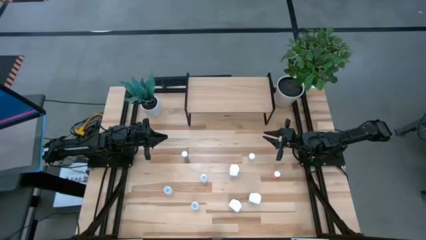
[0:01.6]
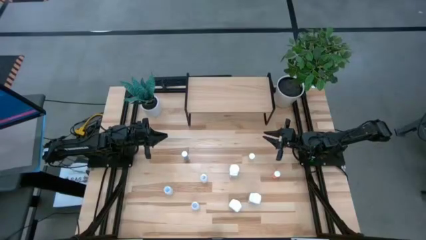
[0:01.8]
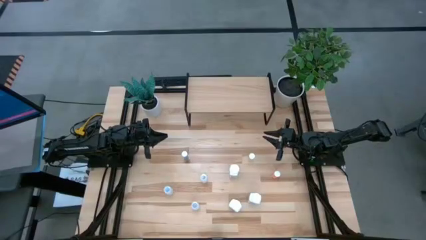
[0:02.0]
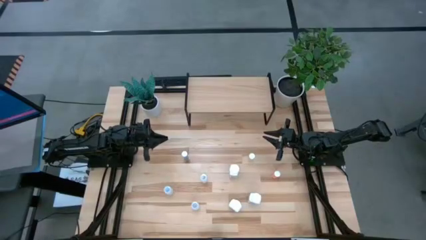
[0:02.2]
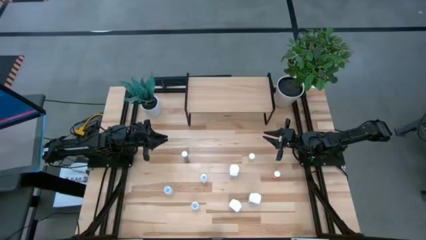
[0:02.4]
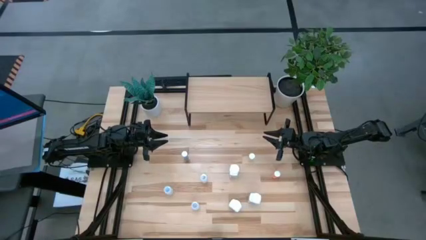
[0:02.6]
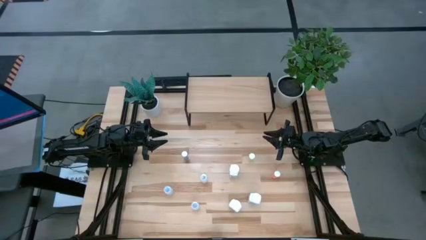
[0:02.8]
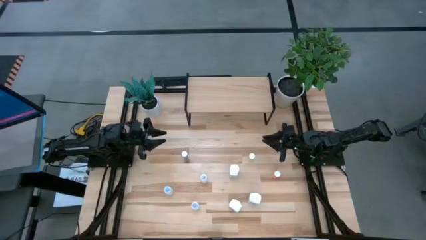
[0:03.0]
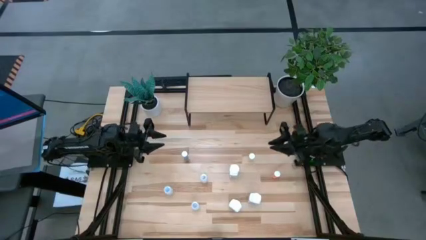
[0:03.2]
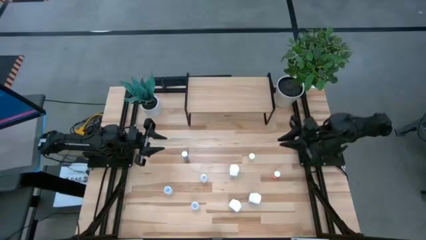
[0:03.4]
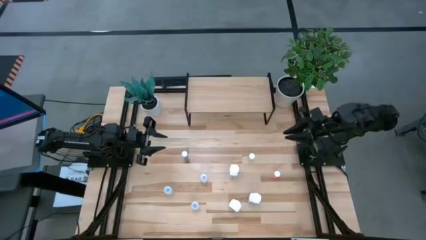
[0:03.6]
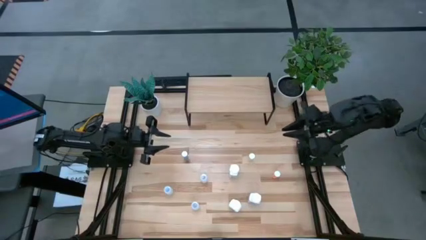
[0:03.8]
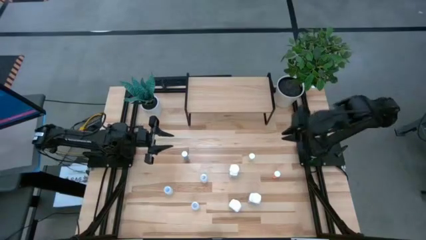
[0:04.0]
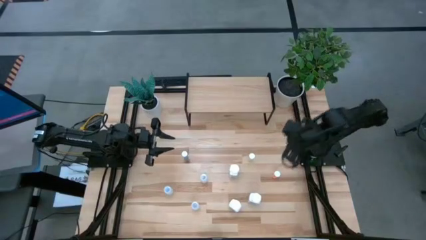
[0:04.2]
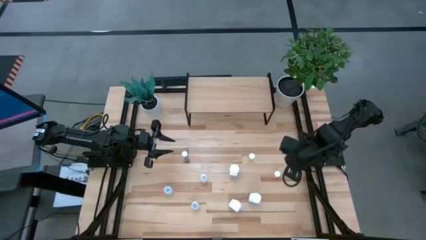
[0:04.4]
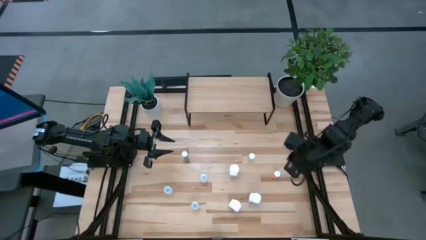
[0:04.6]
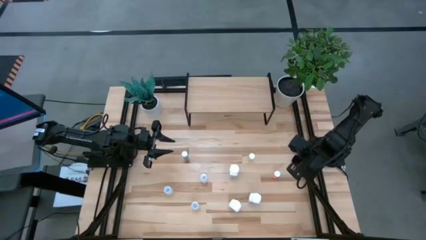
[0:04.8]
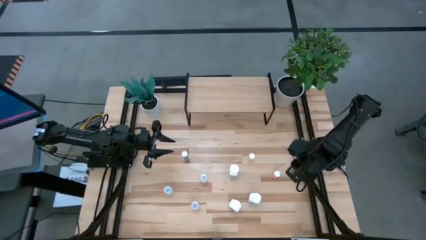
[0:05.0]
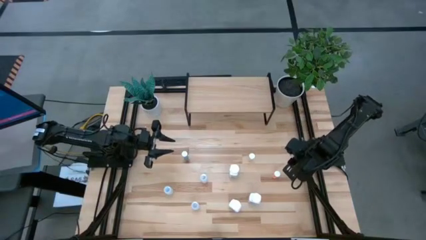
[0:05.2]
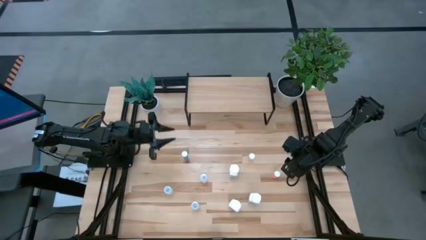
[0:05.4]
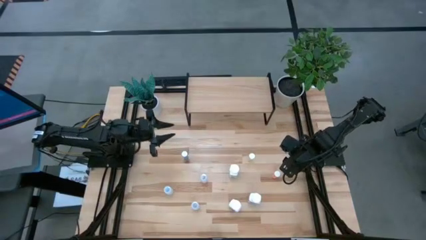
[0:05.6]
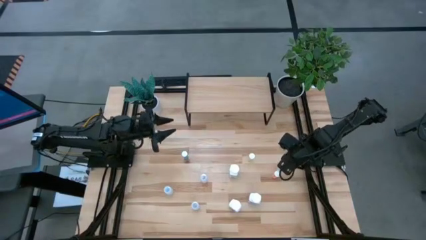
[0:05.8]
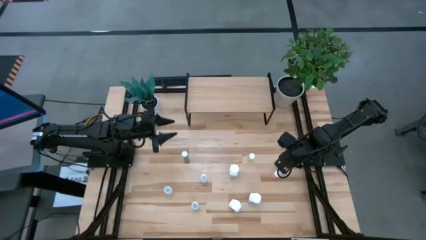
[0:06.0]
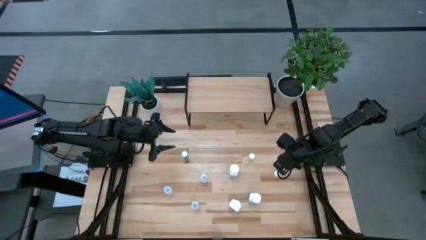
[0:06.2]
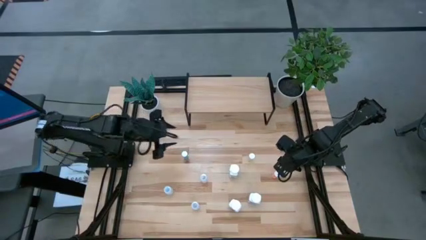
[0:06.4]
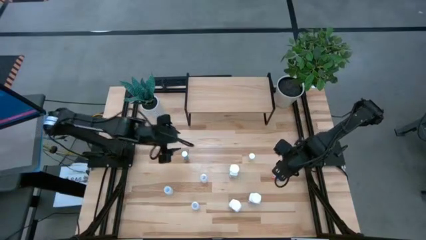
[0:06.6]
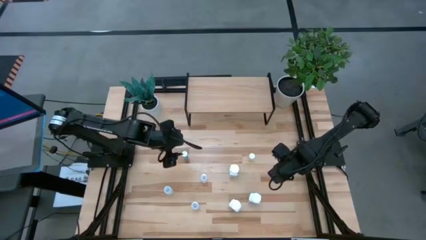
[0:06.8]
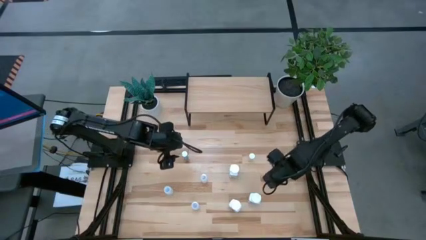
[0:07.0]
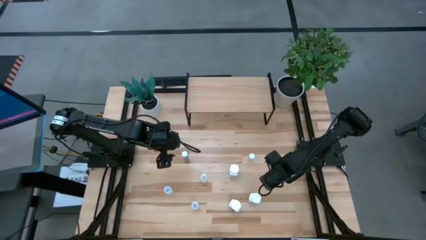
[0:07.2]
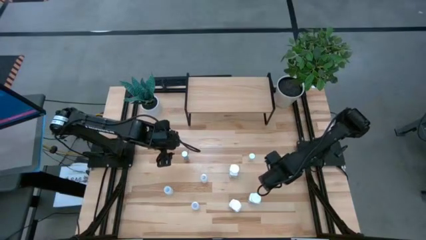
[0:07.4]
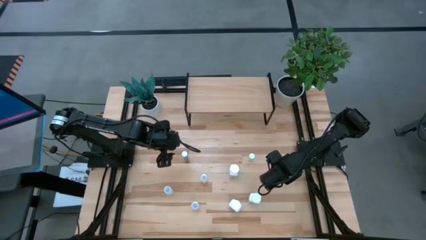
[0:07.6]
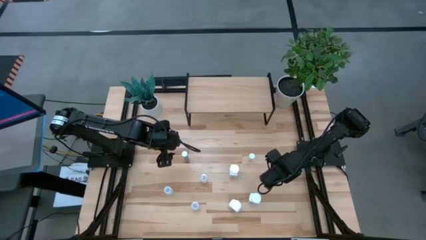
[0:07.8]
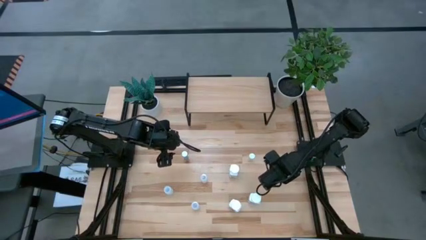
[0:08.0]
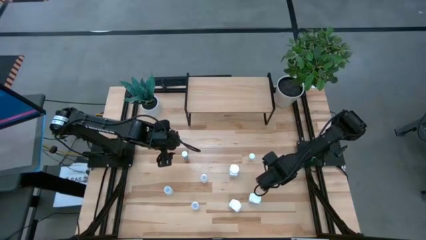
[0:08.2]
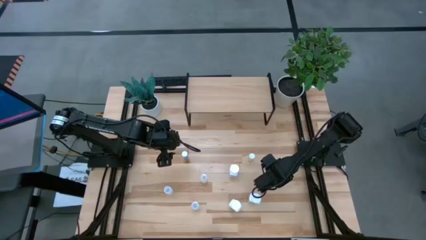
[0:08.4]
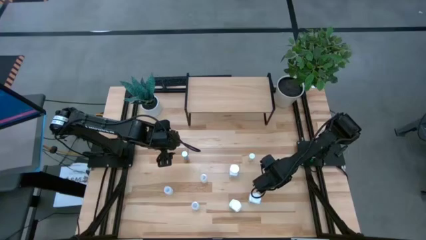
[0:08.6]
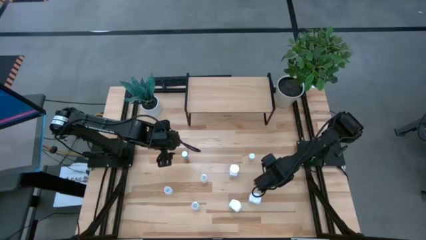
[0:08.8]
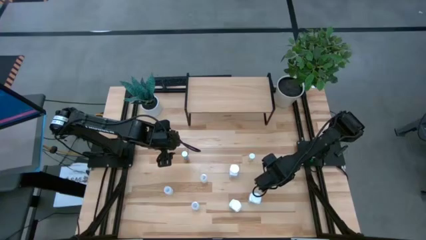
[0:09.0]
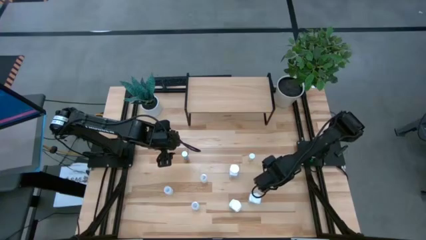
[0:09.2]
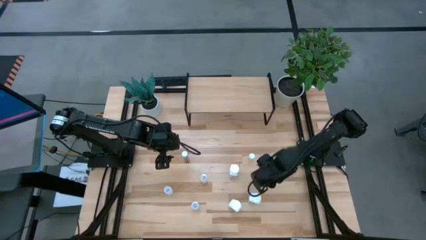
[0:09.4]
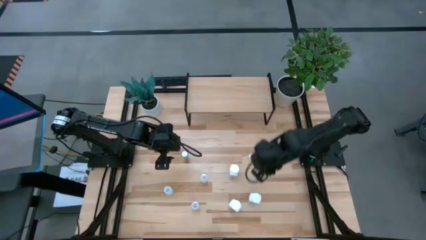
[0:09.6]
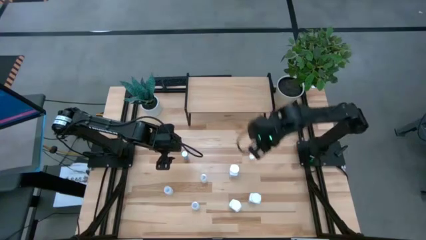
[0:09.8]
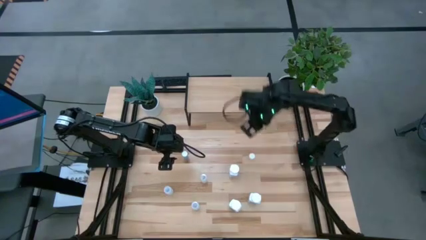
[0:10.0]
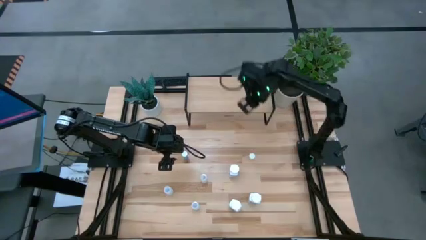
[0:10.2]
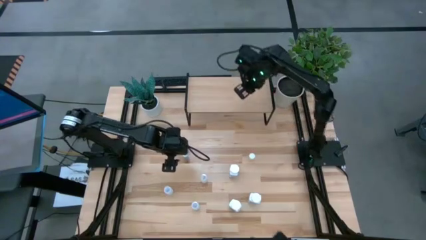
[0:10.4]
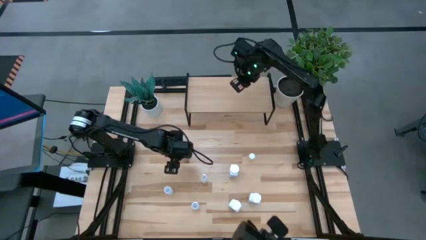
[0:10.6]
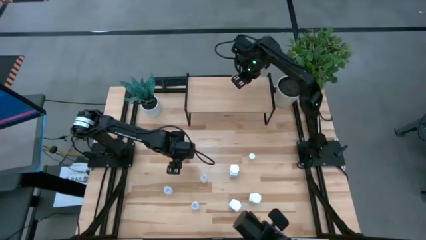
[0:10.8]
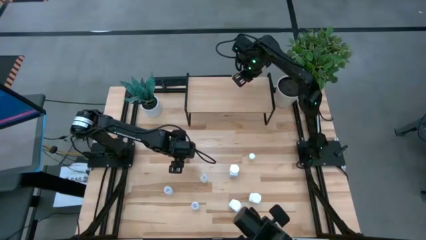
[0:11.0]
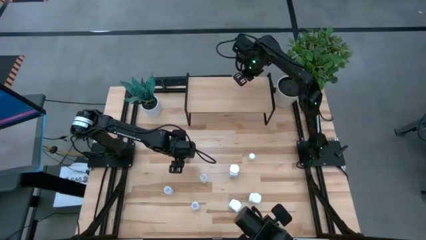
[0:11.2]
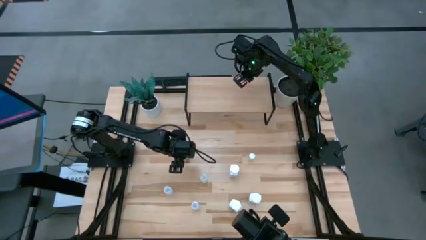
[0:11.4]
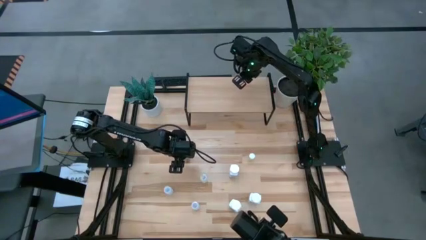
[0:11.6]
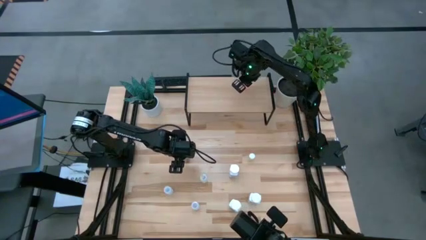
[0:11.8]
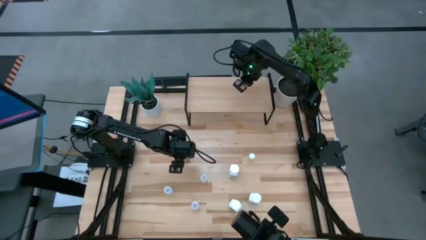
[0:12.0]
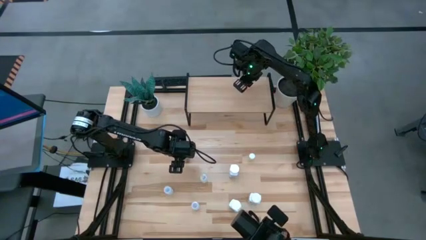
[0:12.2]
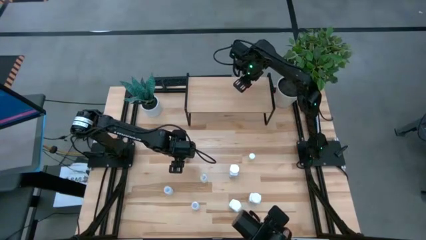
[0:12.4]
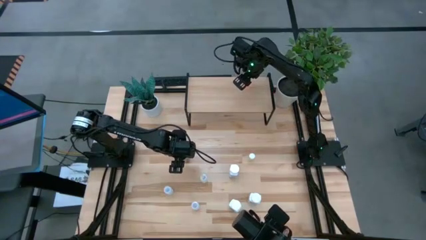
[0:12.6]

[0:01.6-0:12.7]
Task: Pick and place medicine bottles onto shelf by color
Put the pink pill bottle on the shelf

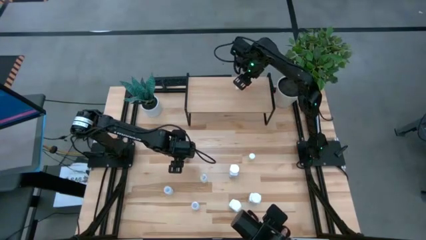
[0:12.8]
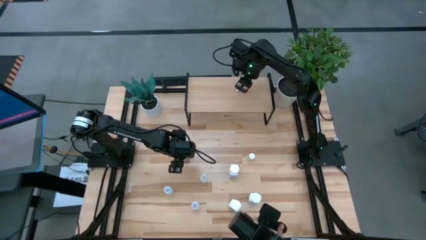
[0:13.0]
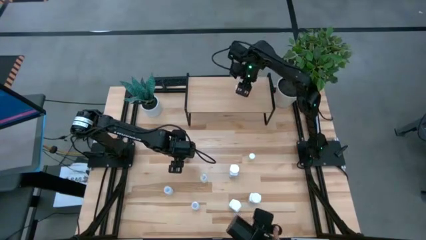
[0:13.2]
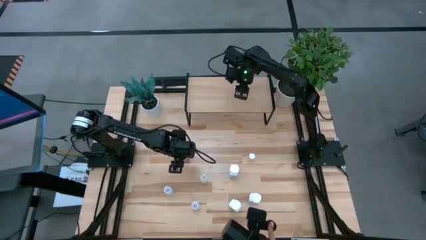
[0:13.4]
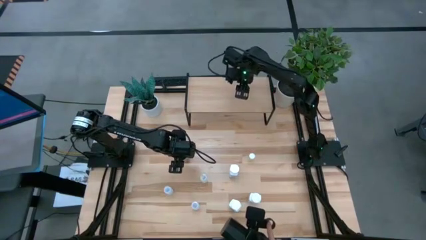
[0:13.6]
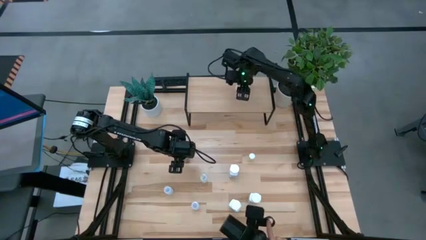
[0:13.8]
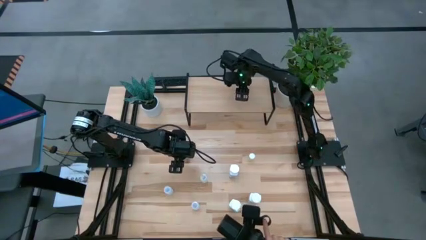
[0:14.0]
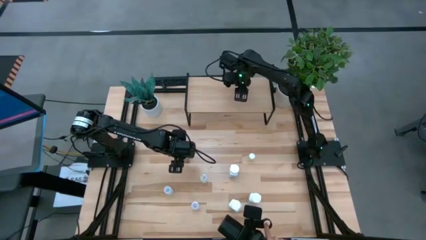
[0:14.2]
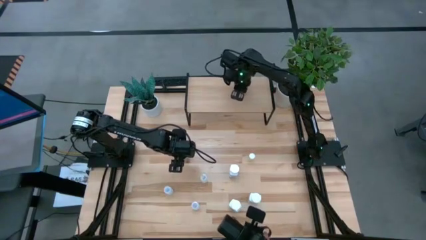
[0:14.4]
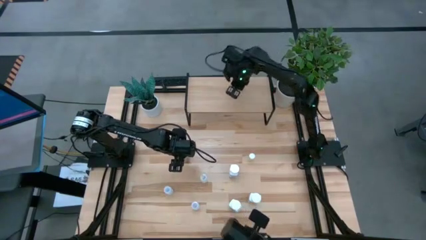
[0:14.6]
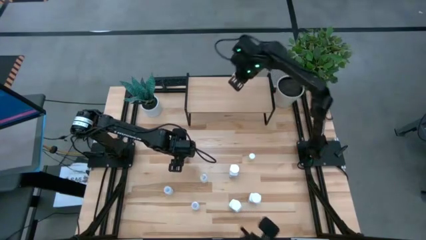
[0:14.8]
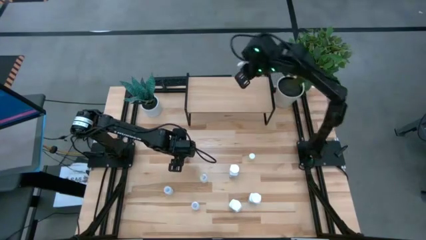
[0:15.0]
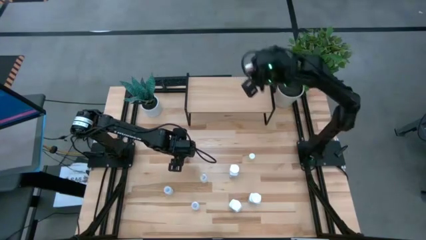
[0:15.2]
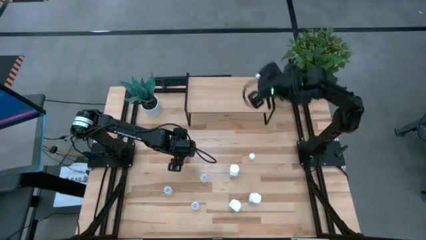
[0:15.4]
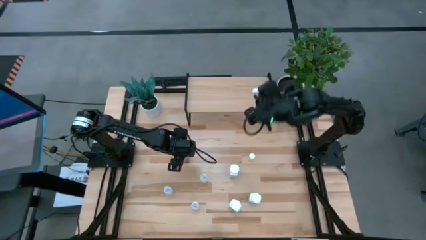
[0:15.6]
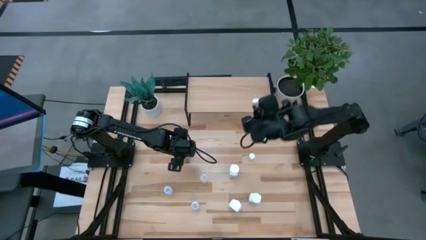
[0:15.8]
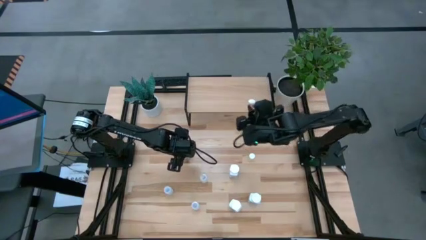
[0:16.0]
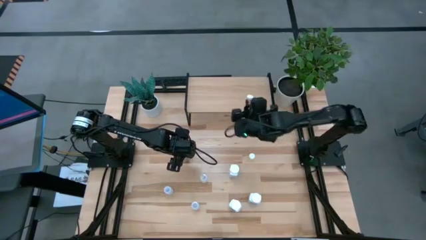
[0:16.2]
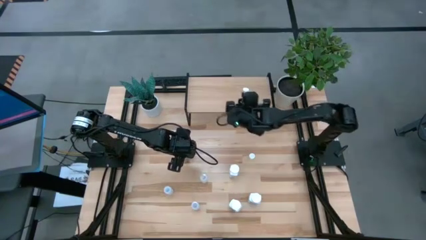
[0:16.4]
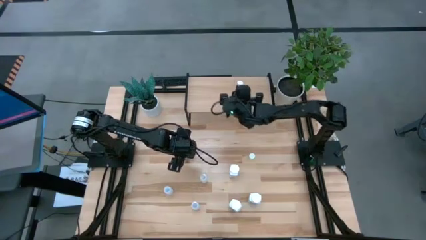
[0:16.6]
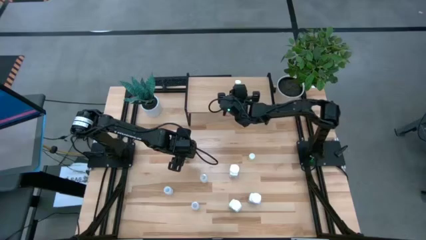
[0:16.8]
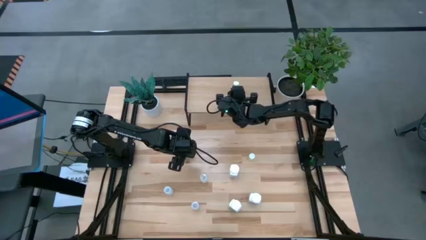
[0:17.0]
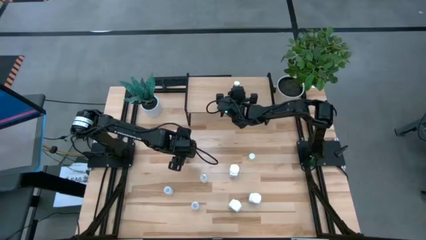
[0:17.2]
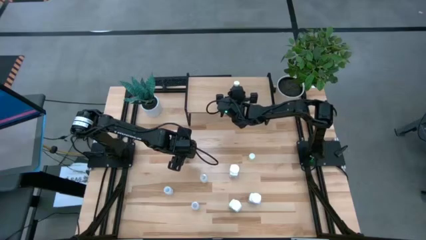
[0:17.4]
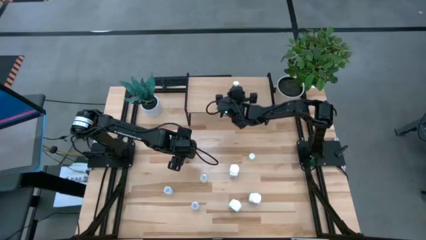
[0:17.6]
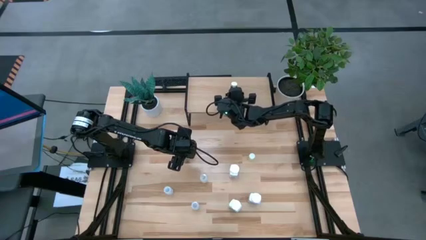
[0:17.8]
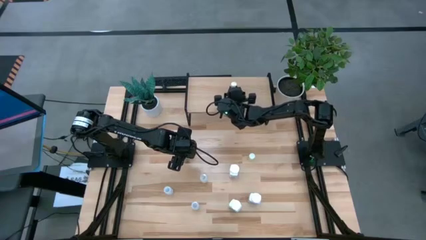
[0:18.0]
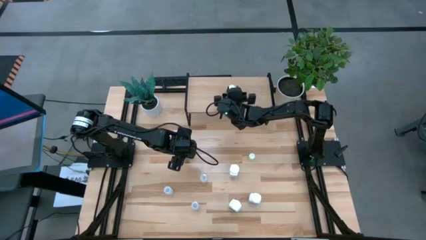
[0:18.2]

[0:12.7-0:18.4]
Put the pink pill bottle on the shelf
